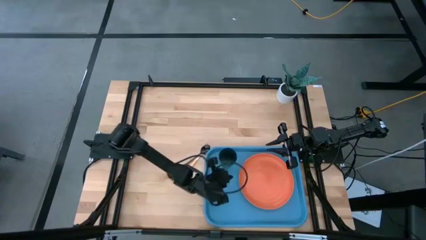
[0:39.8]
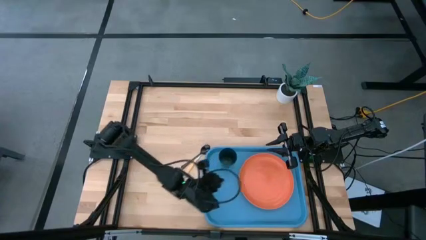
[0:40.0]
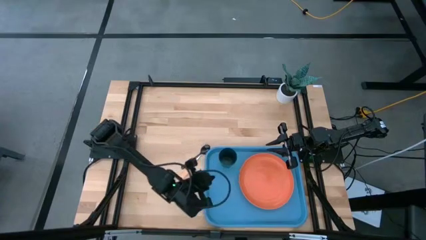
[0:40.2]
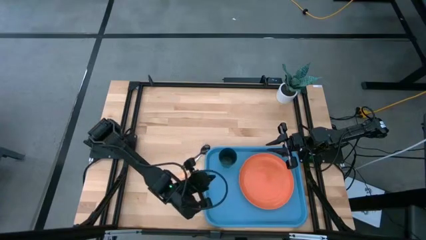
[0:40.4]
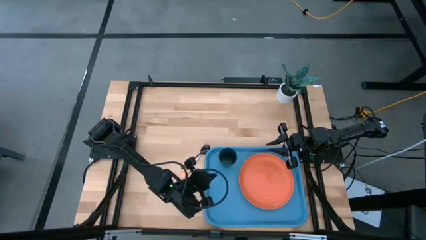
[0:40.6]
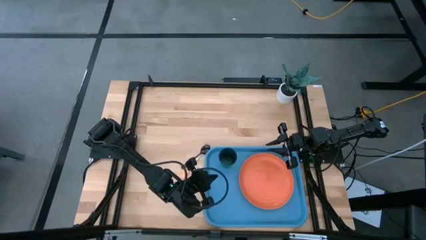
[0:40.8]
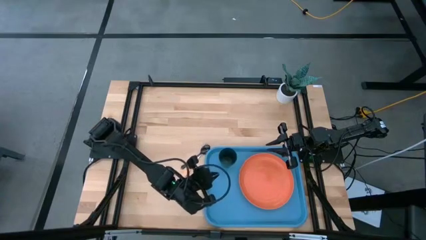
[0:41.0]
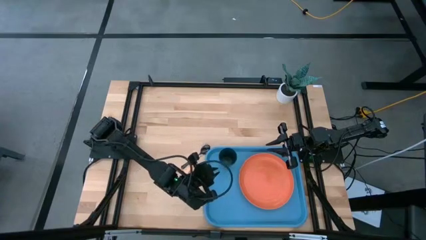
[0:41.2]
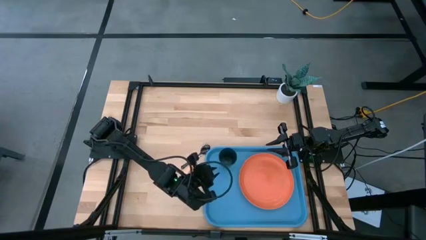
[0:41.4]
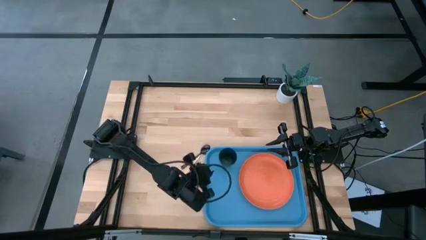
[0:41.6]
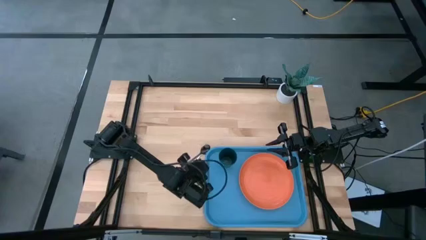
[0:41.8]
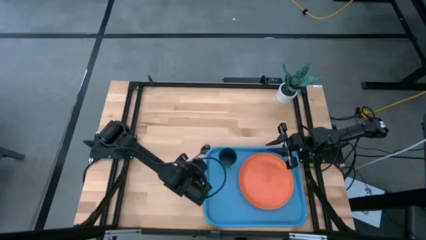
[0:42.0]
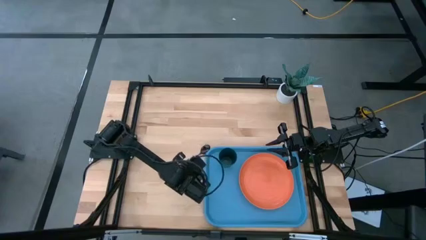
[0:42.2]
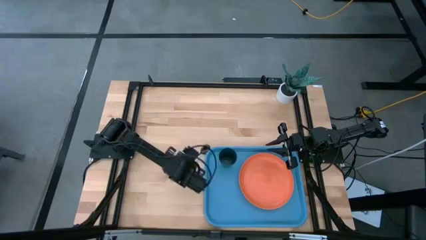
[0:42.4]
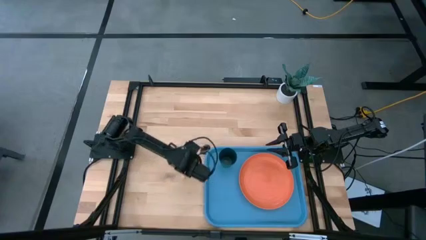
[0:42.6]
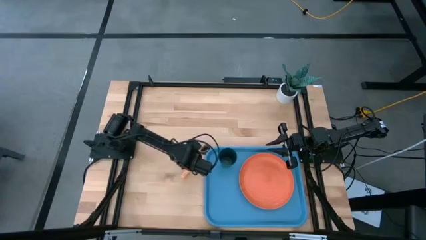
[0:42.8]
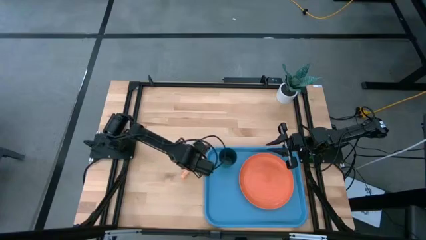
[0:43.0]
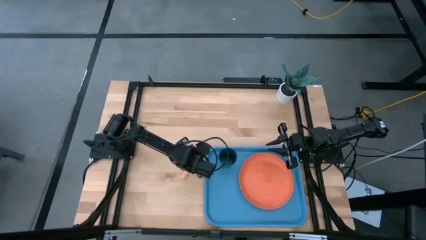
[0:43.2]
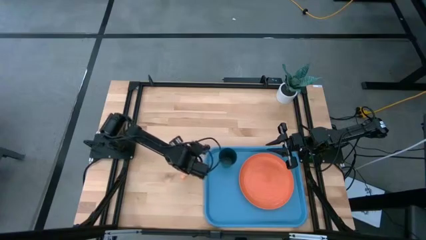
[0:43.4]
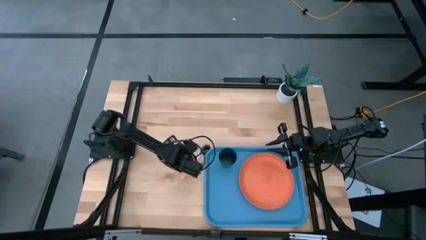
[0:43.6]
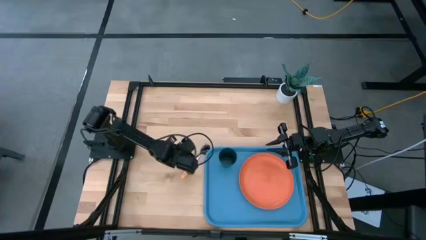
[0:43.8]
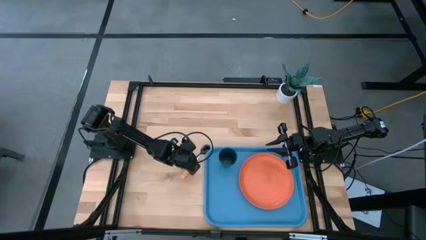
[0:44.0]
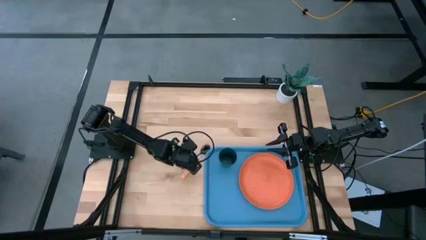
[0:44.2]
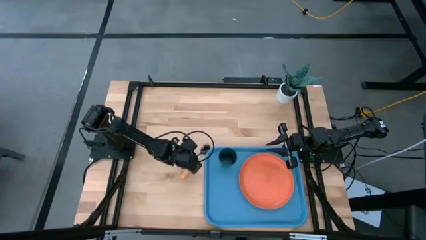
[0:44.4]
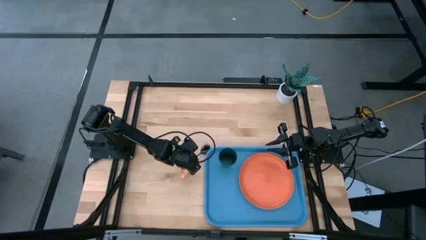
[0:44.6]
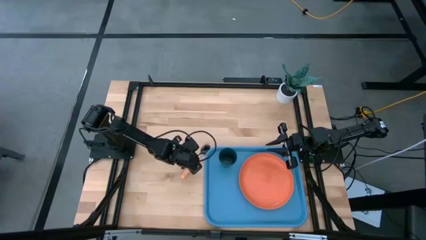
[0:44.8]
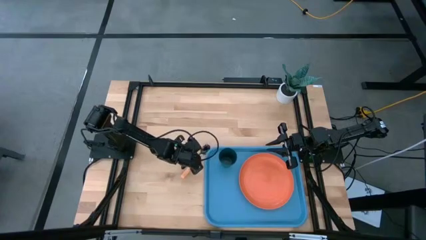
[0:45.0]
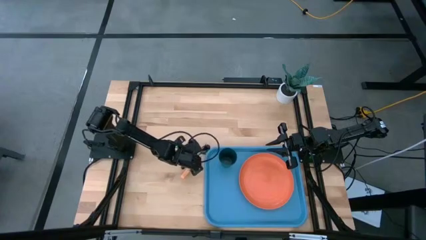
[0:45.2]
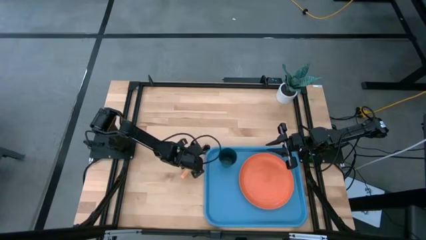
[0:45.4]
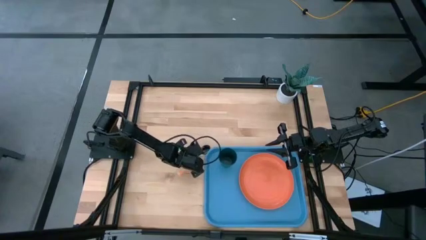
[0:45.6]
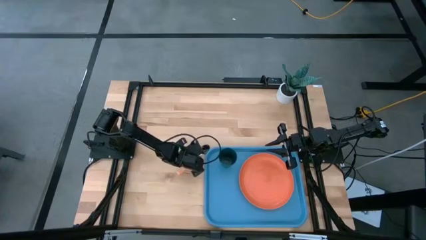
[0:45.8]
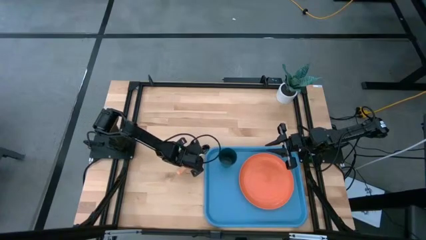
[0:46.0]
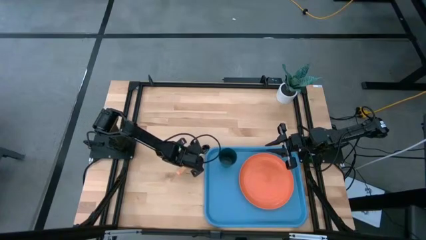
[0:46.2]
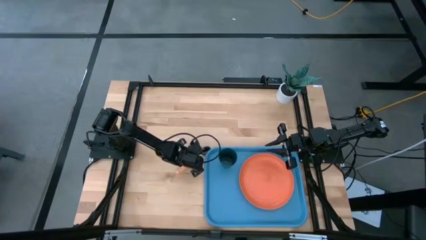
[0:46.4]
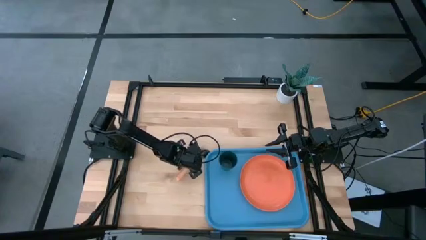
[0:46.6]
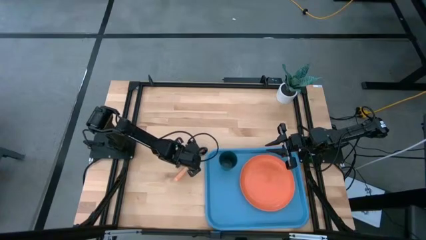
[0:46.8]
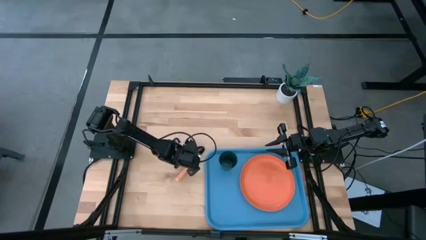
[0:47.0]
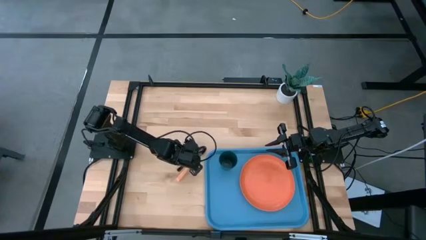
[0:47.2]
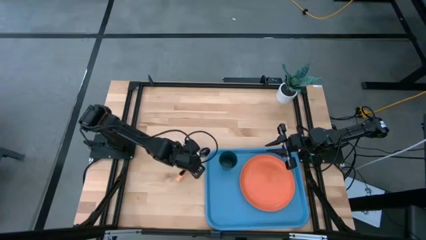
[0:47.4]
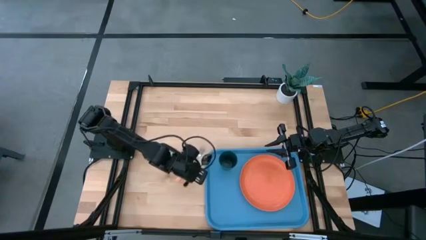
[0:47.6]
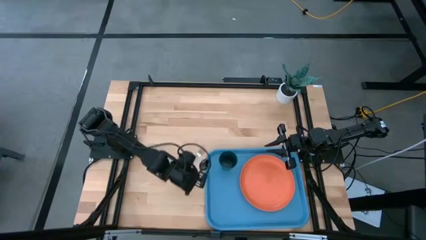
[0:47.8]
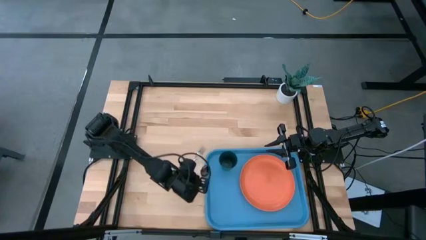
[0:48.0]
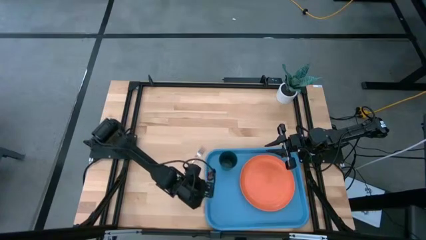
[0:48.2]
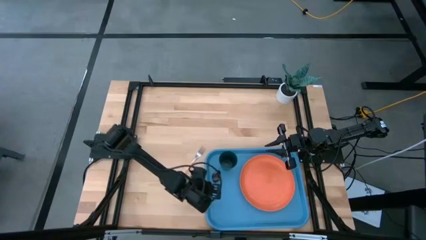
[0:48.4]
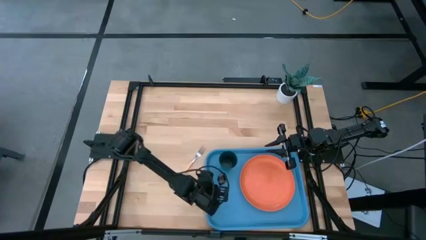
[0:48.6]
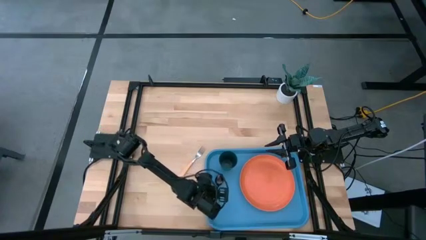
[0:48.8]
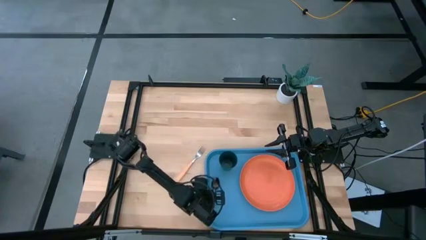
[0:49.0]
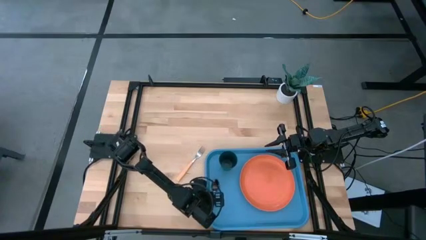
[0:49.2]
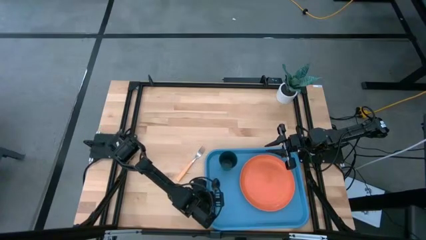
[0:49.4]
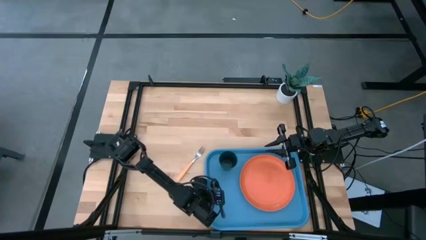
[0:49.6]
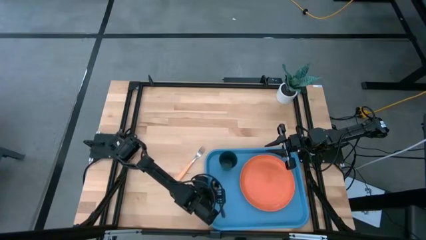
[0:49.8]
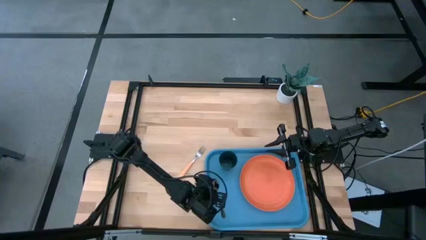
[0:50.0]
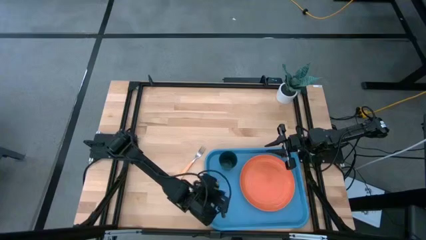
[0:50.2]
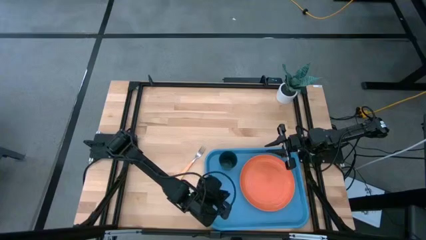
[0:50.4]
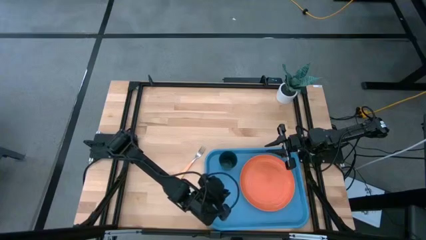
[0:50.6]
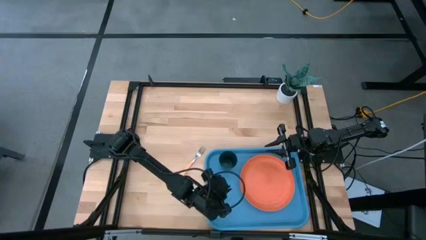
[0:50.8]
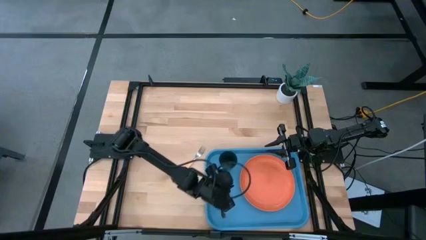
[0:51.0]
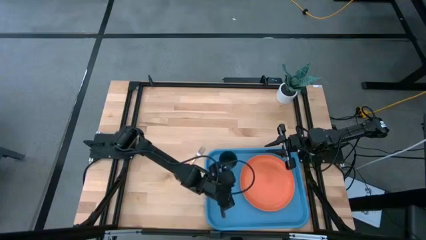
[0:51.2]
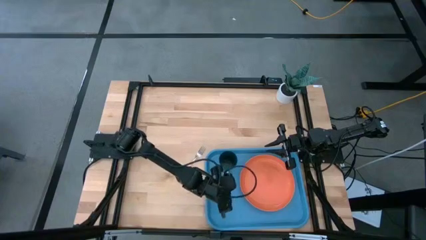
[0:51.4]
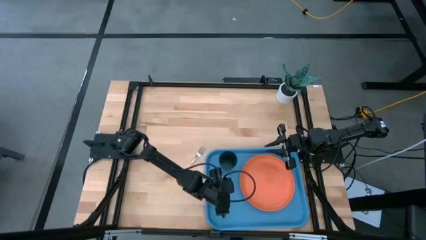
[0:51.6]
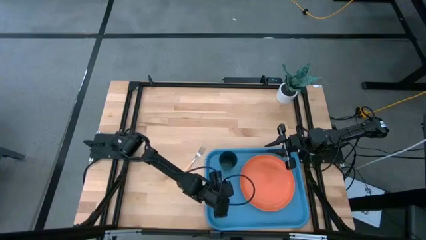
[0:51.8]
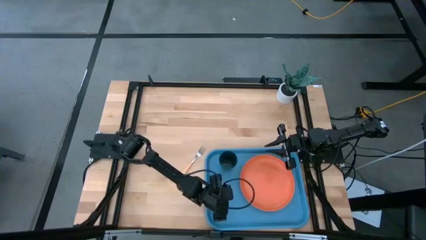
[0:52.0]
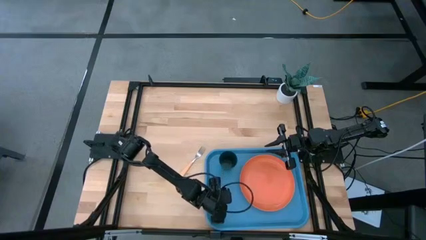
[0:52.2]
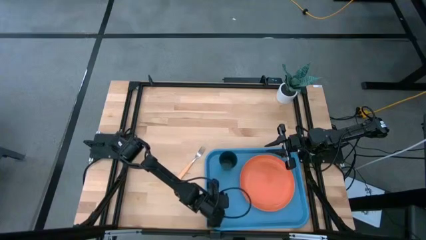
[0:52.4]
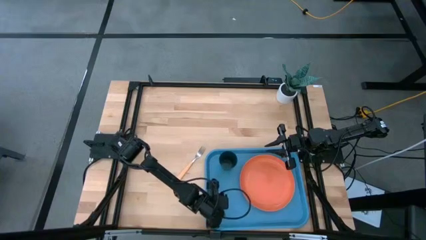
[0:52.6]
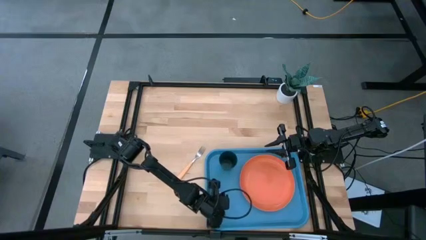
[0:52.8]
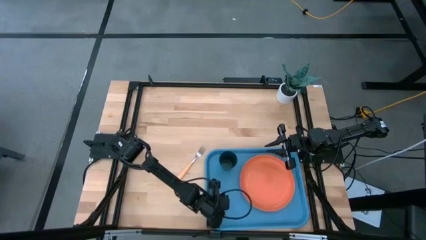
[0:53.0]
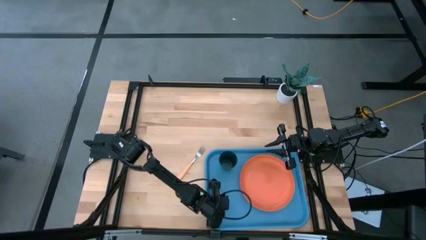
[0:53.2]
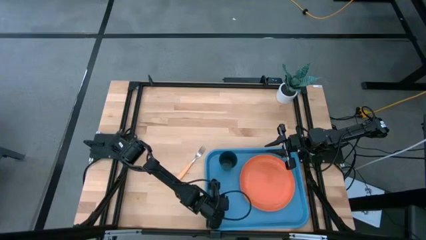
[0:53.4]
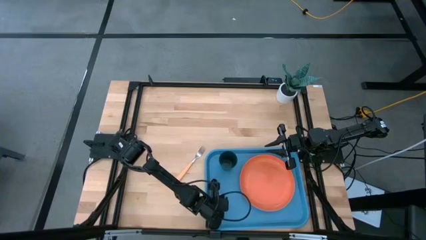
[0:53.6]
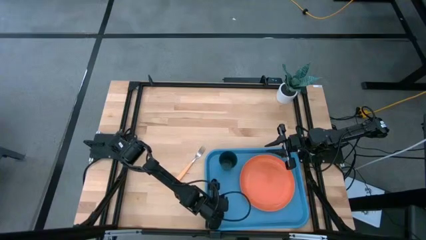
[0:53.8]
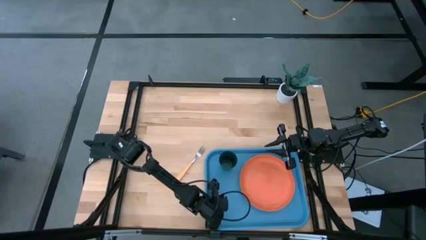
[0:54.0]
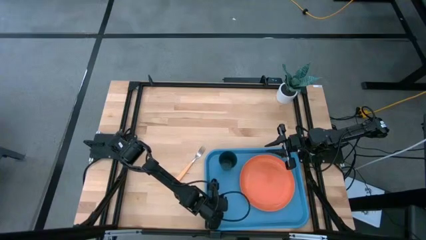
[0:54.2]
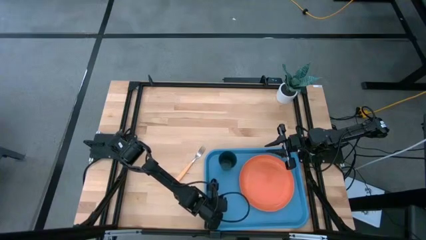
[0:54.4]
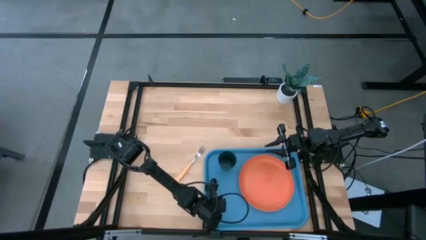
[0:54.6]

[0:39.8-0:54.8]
Task: Pick and place plate/cup/fork/spoon on tray
Put the black spoon on the blue serving tray to the bottom left of the green cup

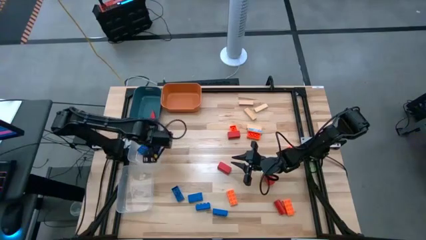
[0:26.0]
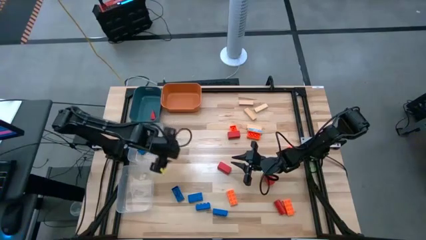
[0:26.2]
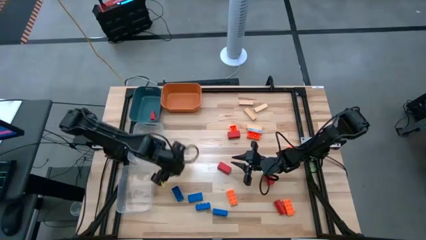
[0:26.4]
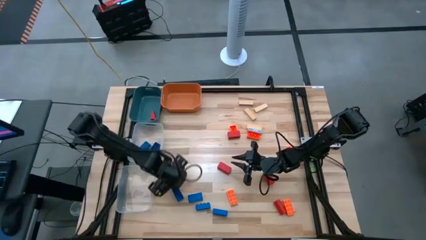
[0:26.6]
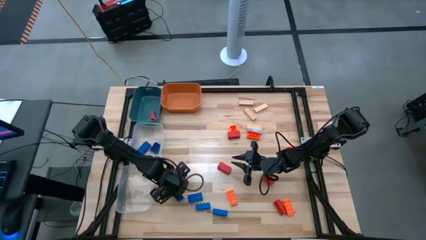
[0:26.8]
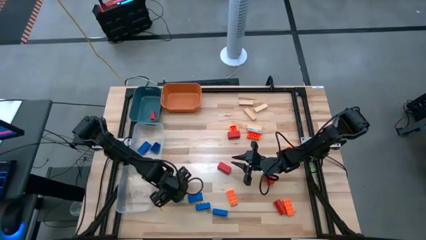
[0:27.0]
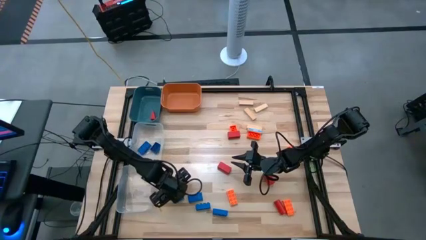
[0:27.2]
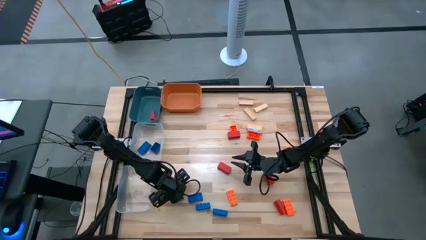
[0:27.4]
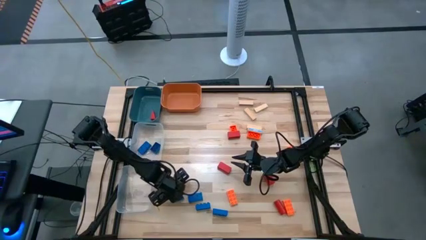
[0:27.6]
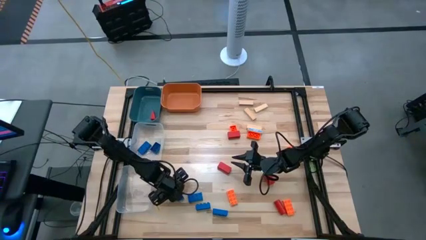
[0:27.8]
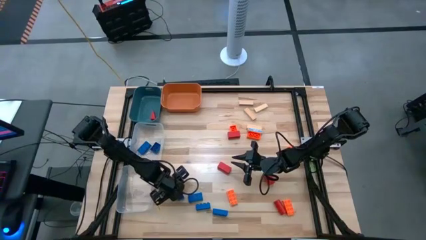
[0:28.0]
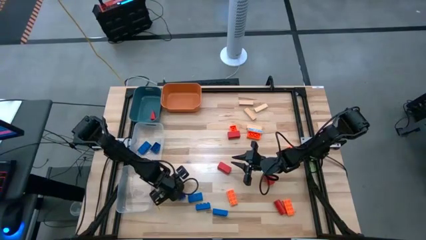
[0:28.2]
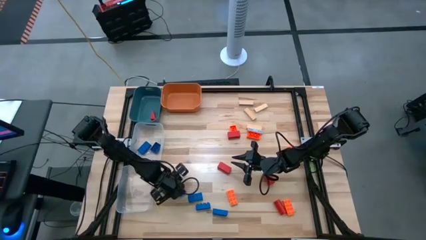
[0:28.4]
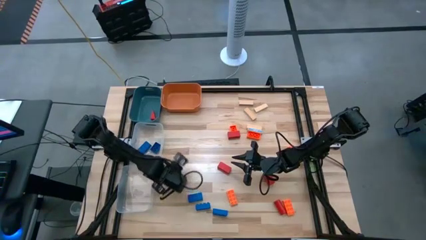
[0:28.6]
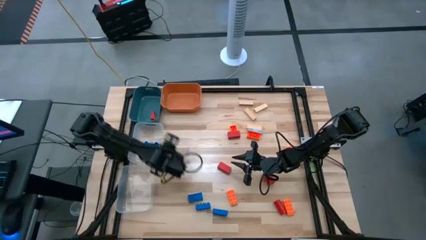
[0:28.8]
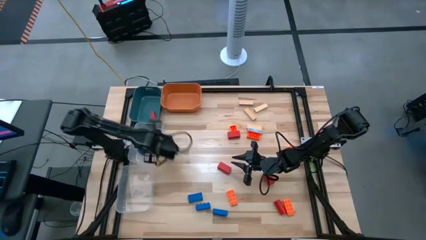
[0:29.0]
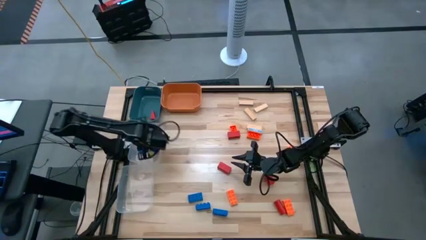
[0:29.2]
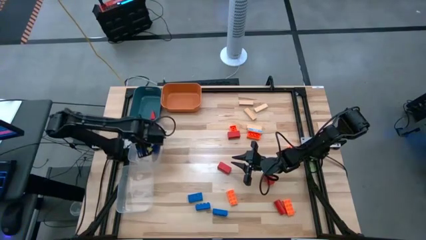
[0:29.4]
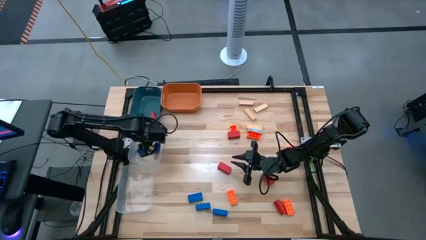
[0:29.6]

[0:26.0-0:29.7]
Task: Sort blocks
Put the blue game piece into the top transparent bin
